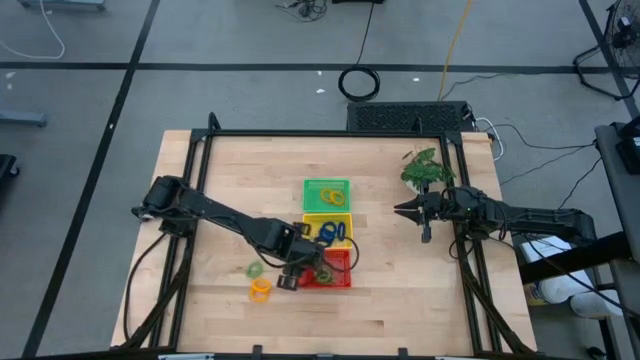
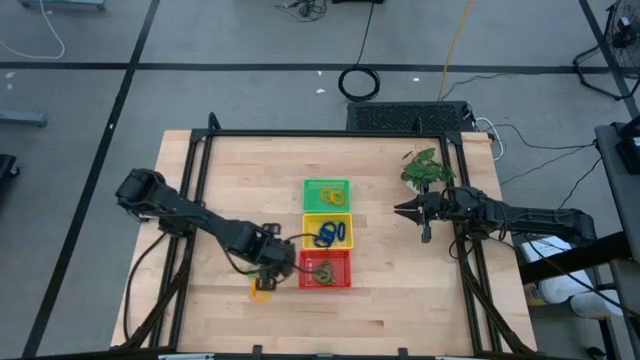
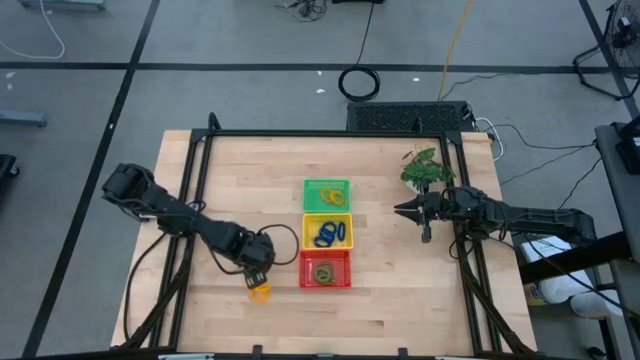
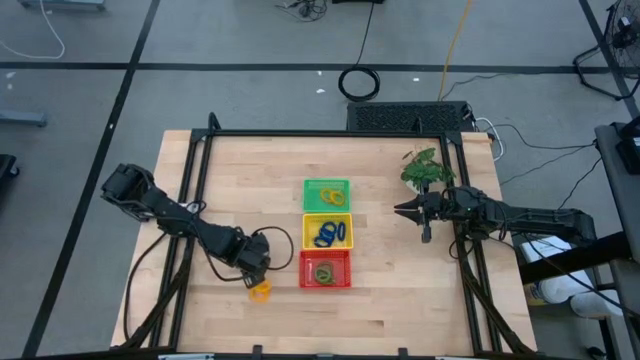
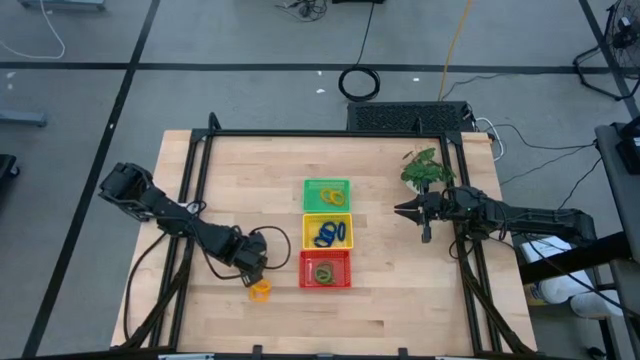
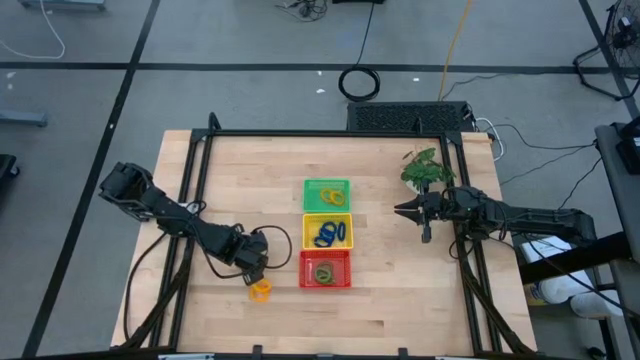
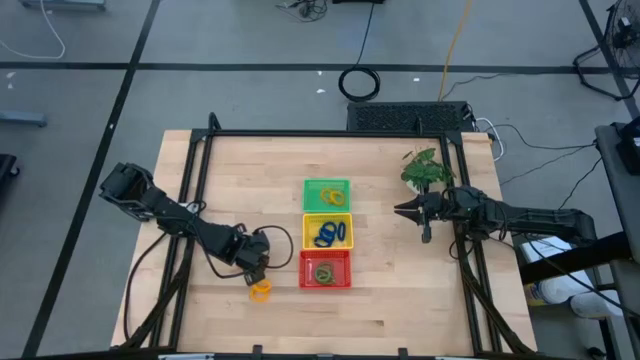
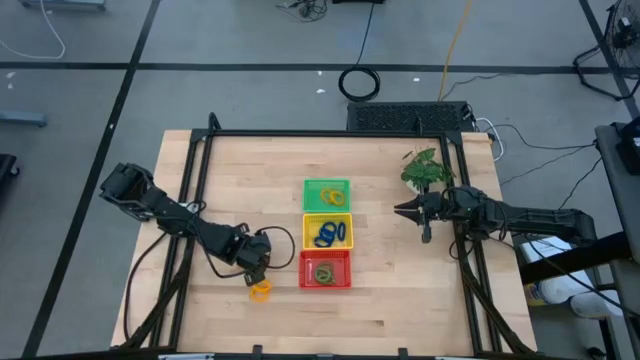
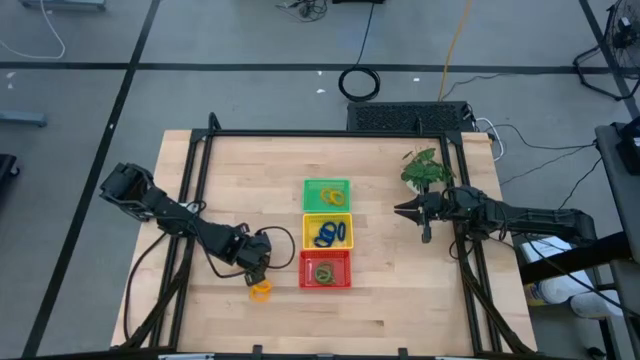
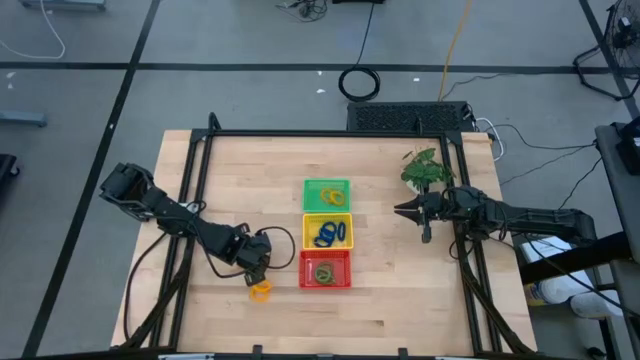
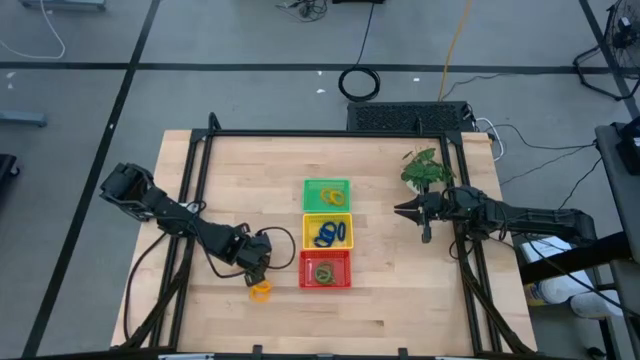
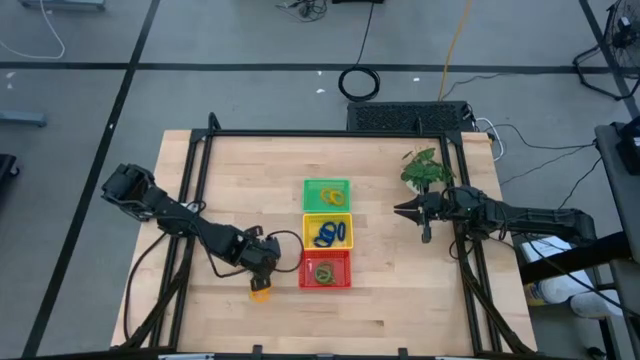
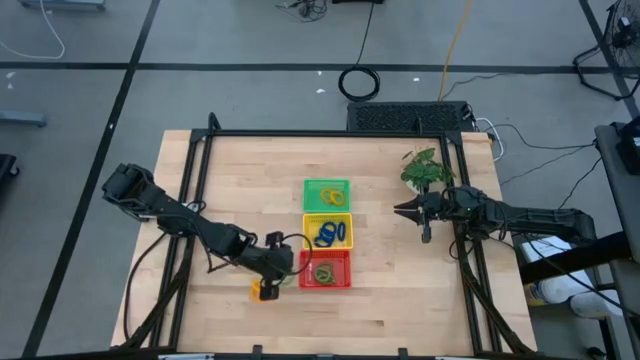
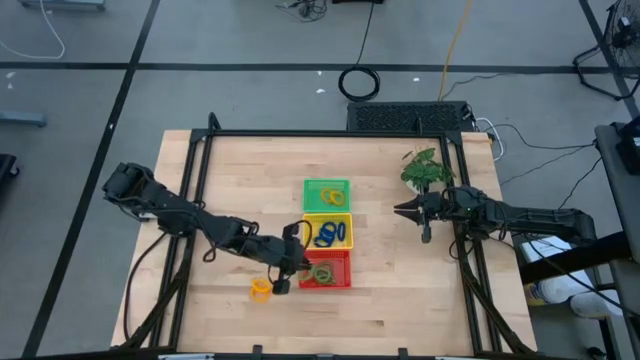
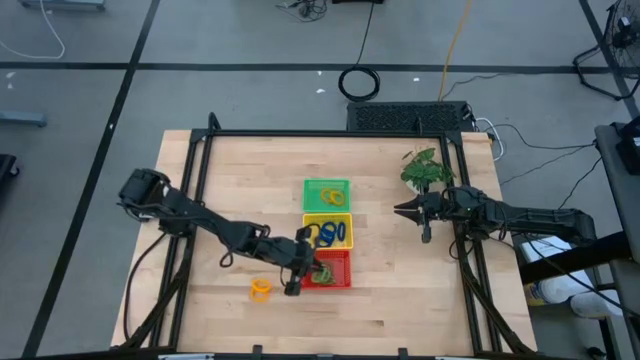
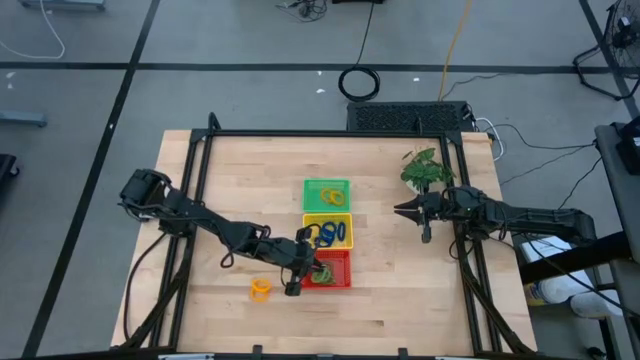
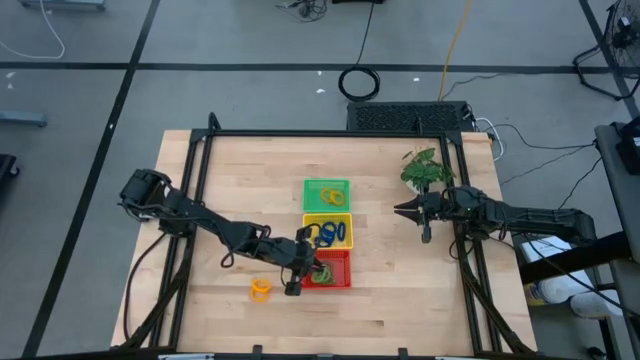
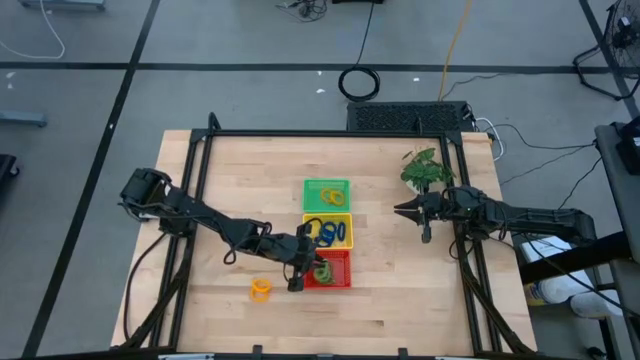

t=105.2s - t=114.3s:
Task: Sort spring keychains into baskets
Put the green spring keychain into the red basket

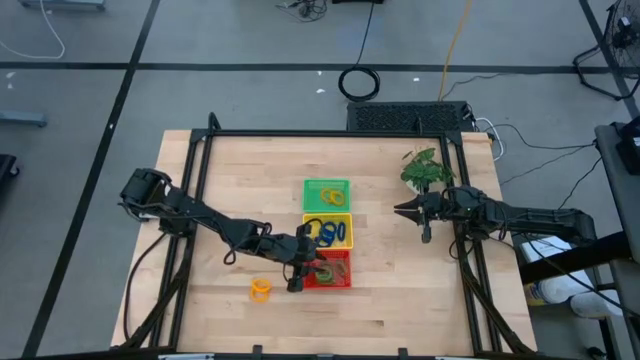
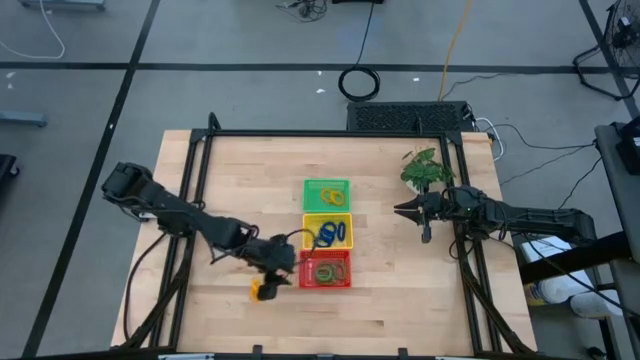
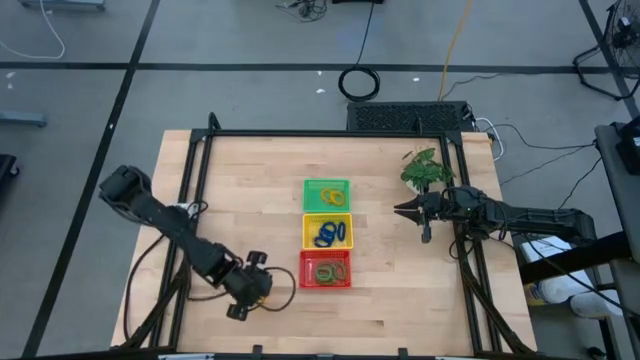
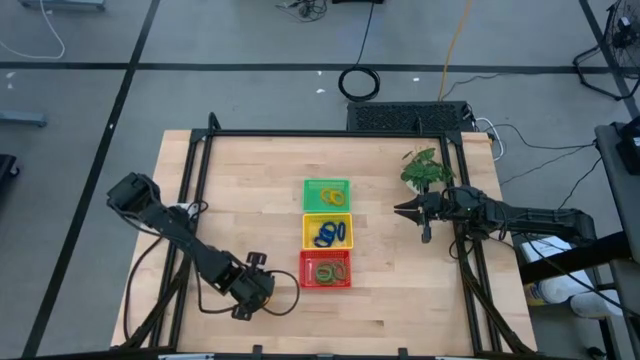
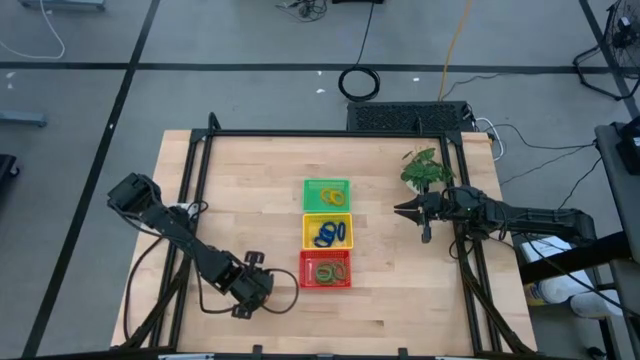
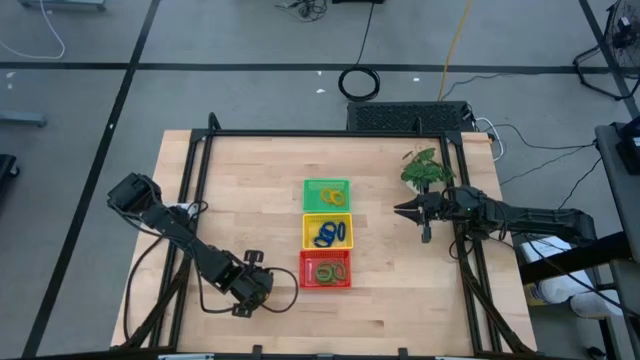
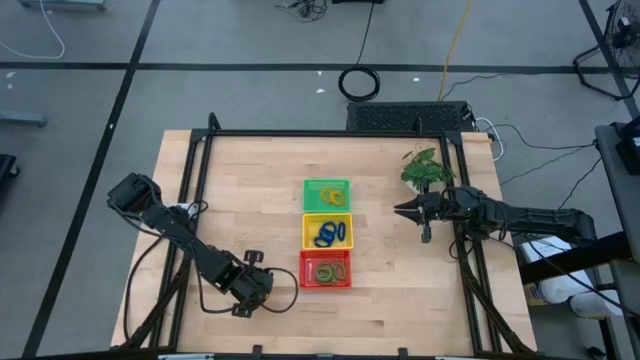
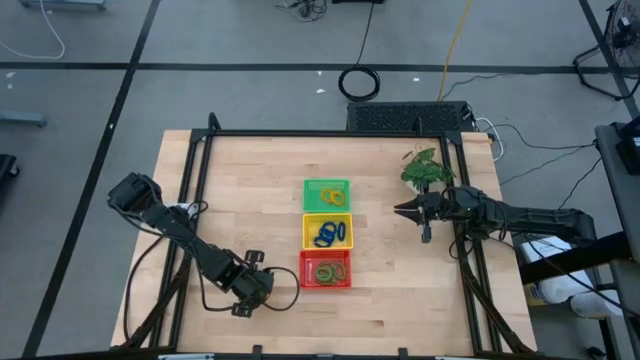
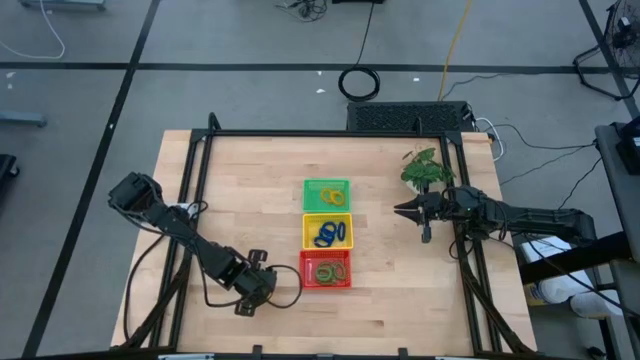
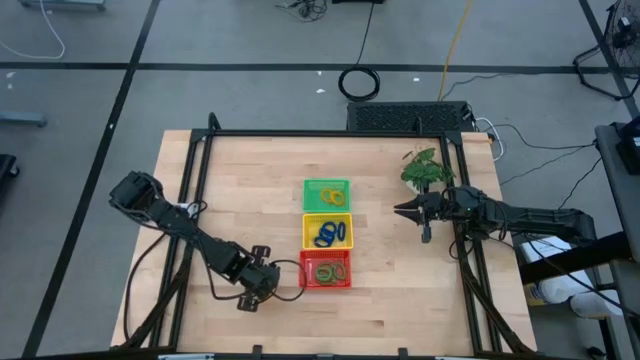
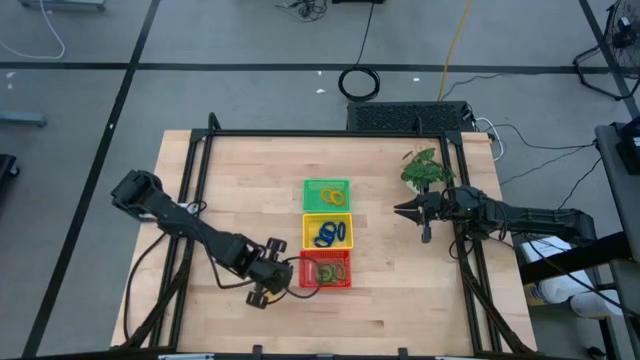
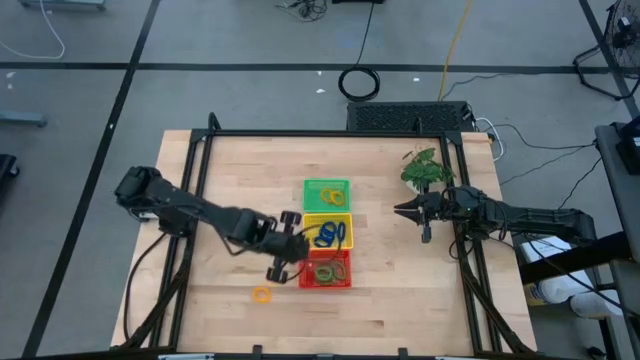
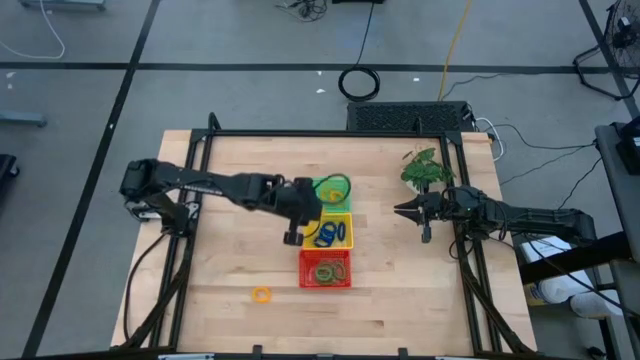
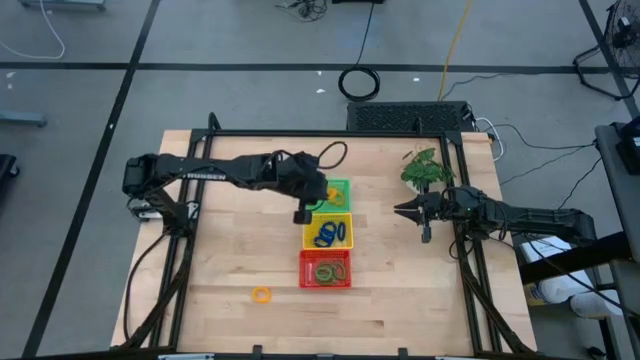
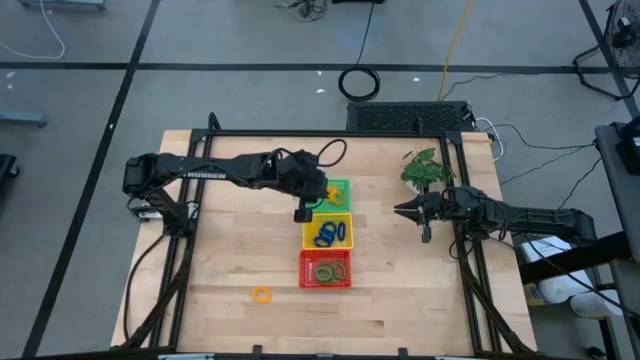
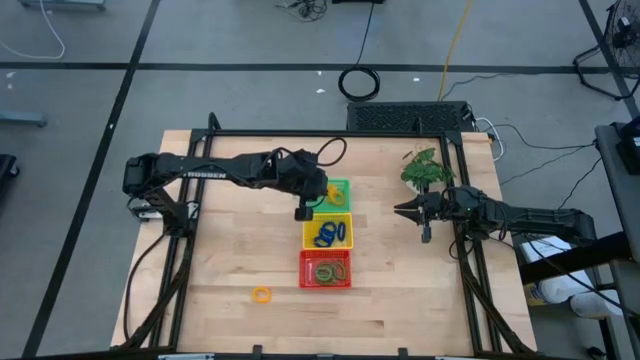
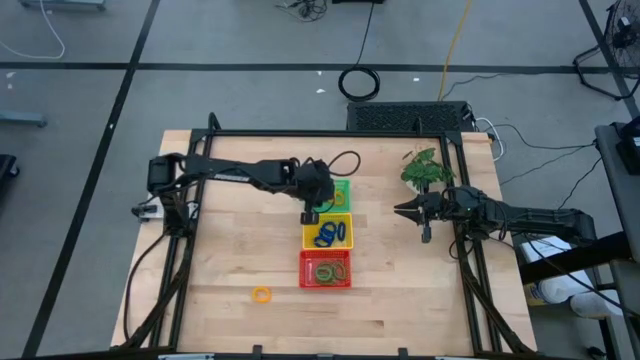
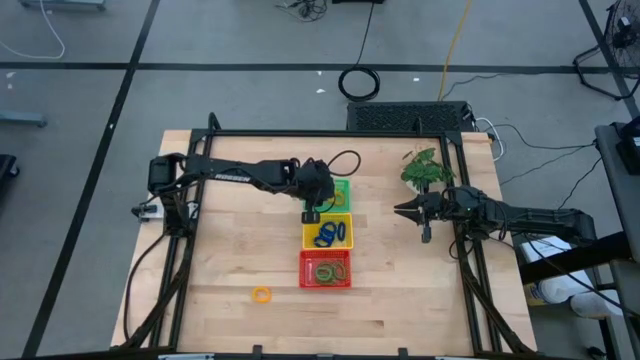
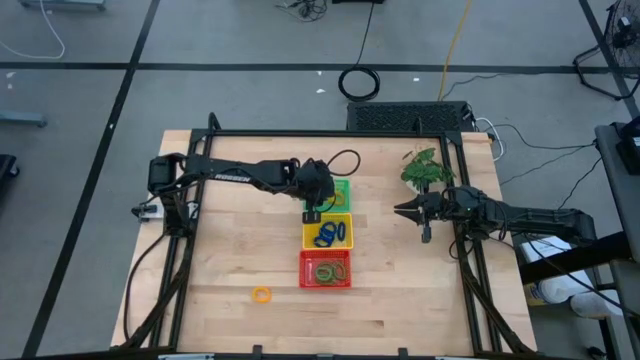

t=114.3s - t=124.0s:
Put the yellow spring keychain into the green basket

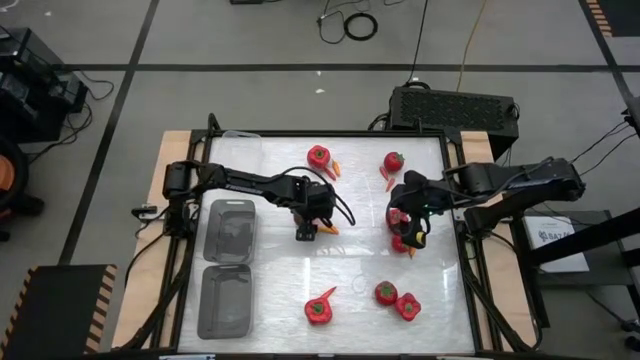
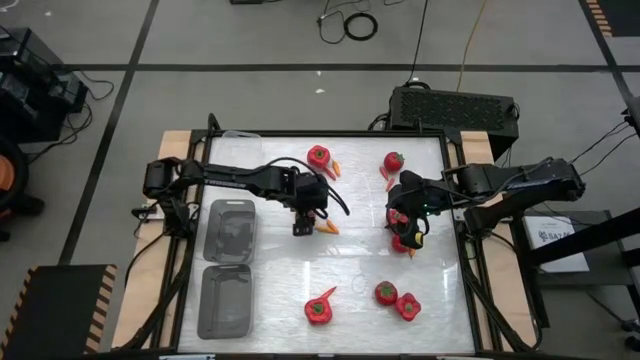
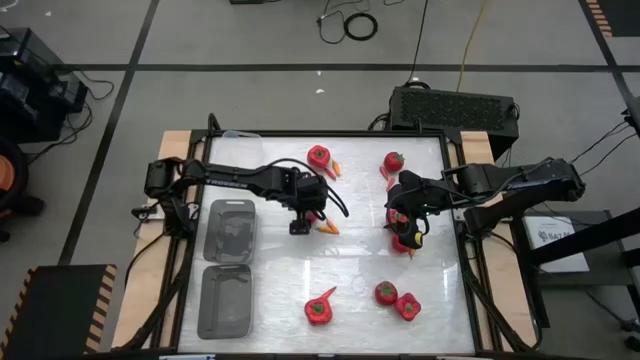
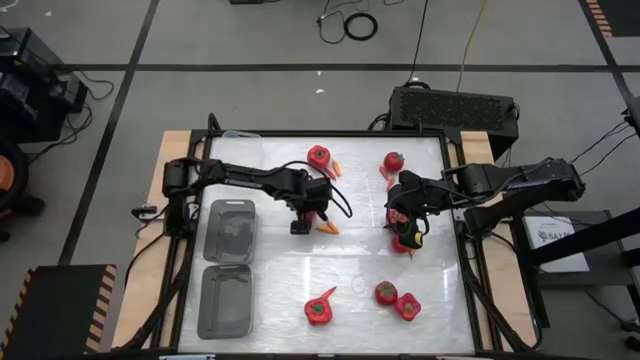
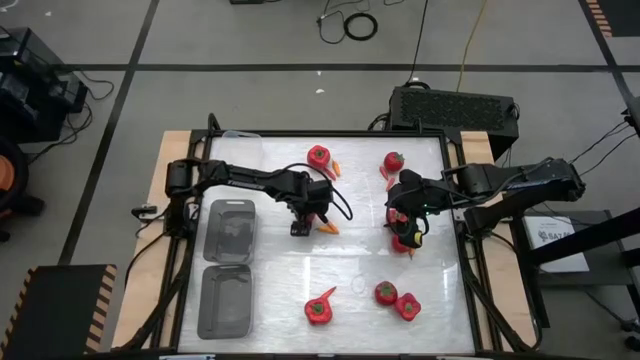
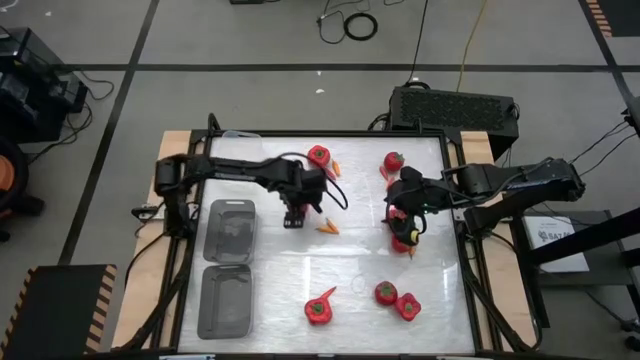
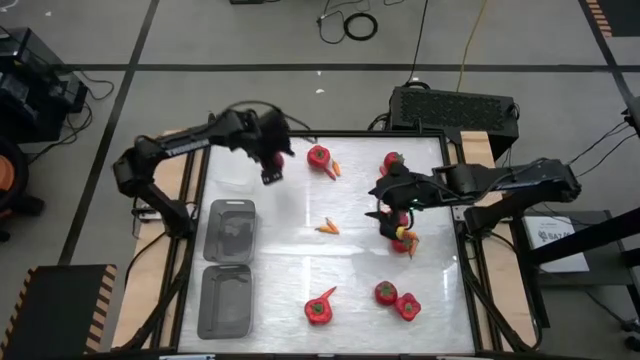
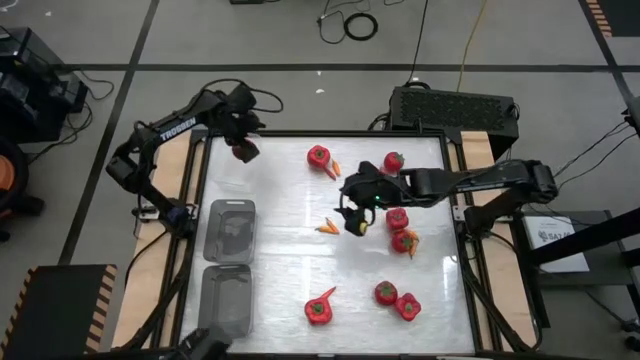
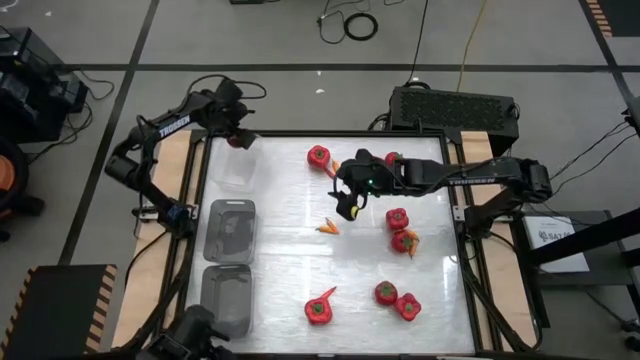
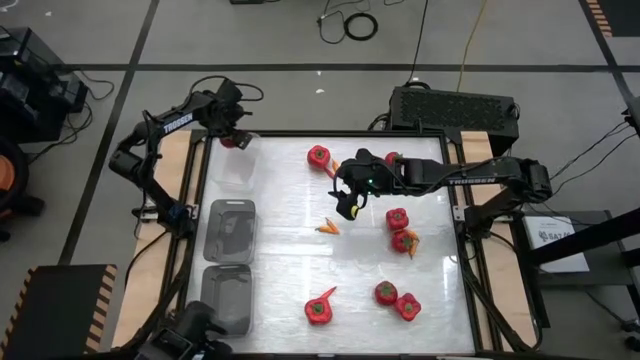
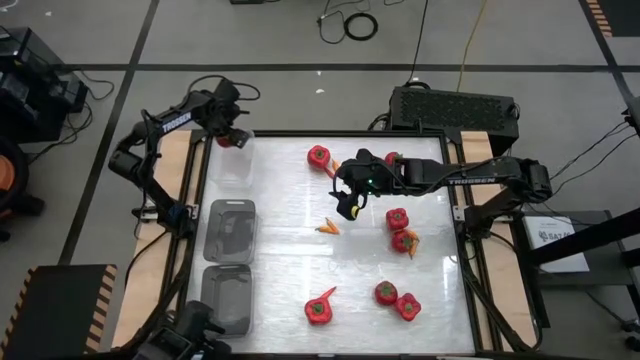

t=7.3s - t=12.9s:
Task: Sort produce into baskets
Put the red tomato into the transparent bin
